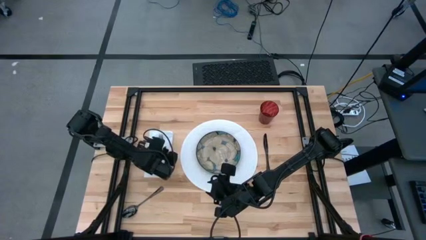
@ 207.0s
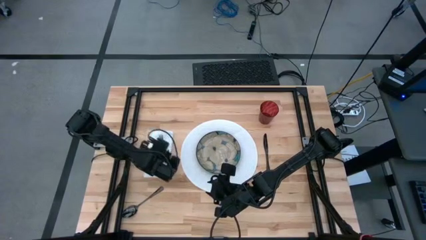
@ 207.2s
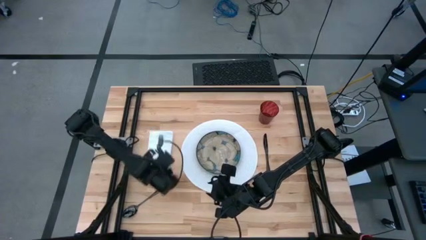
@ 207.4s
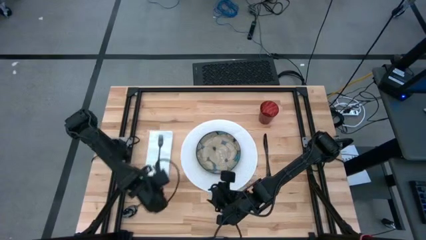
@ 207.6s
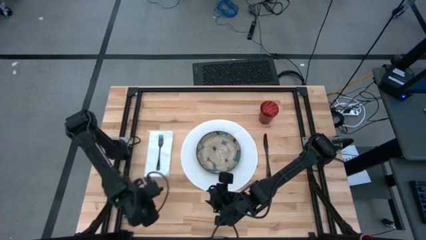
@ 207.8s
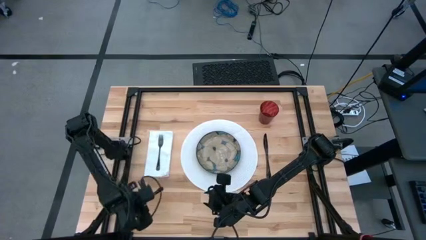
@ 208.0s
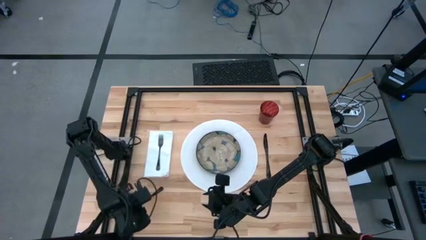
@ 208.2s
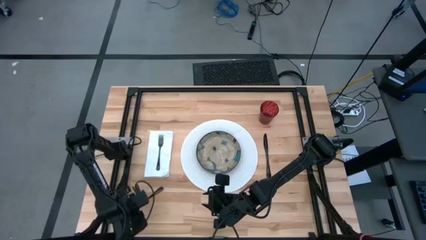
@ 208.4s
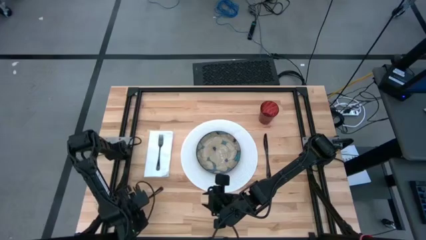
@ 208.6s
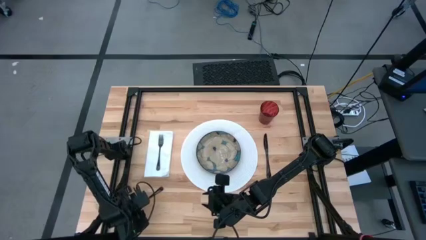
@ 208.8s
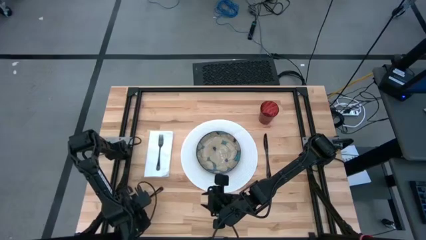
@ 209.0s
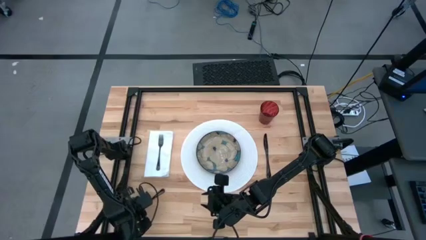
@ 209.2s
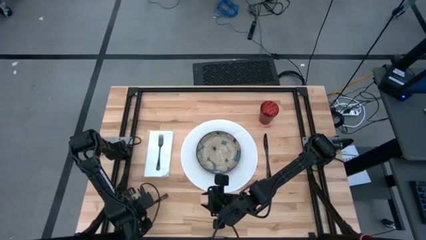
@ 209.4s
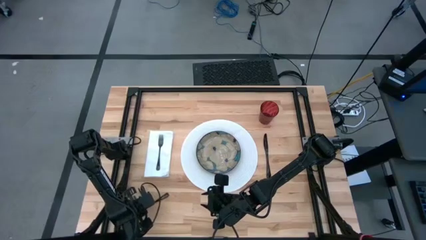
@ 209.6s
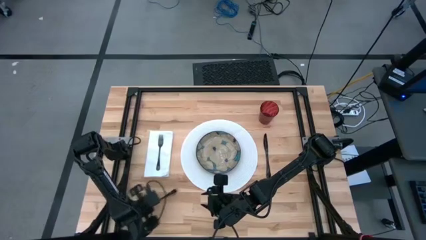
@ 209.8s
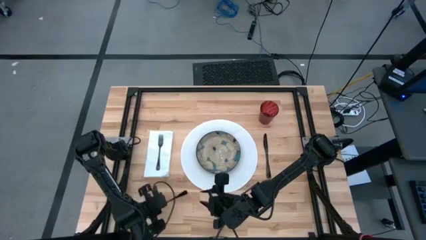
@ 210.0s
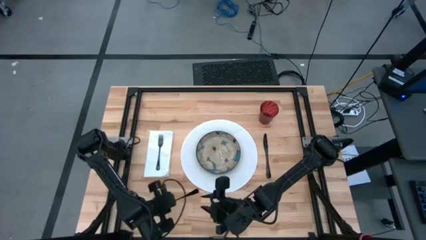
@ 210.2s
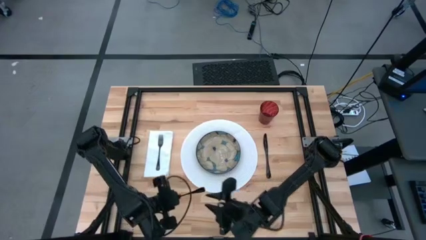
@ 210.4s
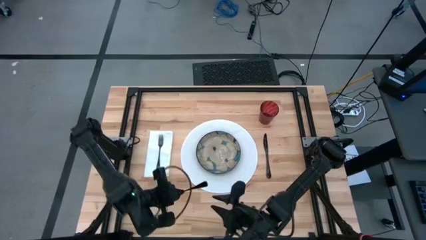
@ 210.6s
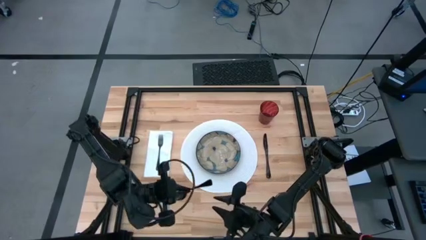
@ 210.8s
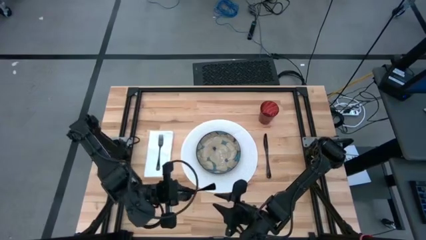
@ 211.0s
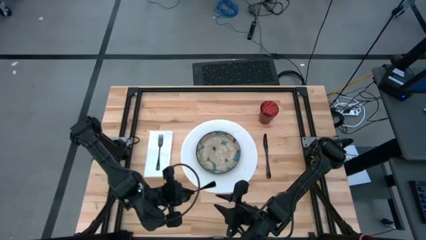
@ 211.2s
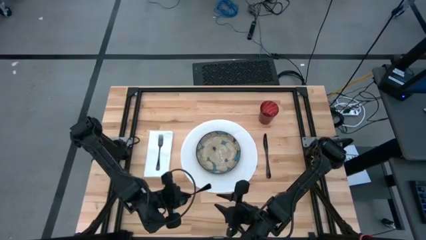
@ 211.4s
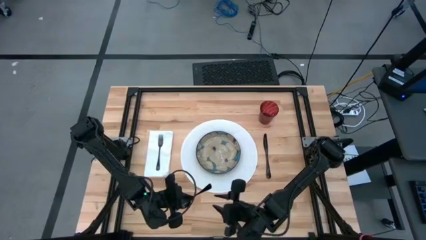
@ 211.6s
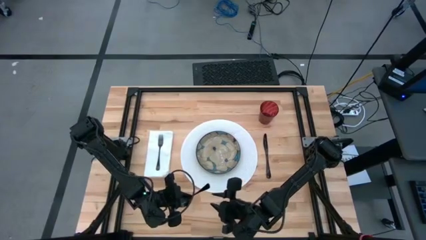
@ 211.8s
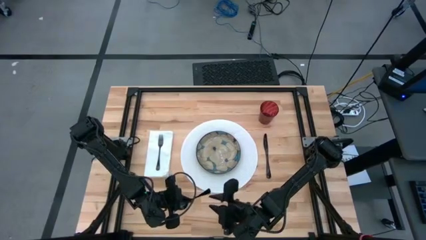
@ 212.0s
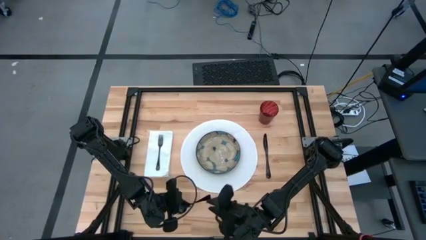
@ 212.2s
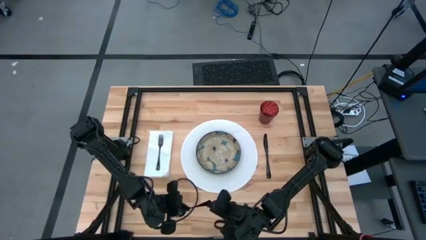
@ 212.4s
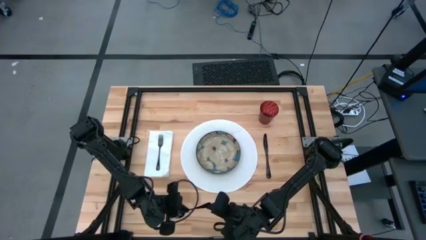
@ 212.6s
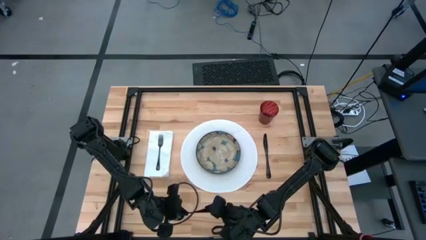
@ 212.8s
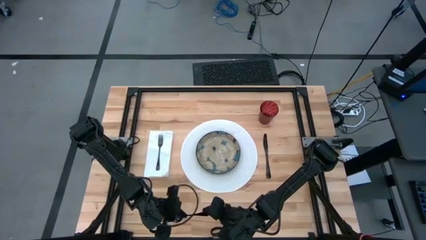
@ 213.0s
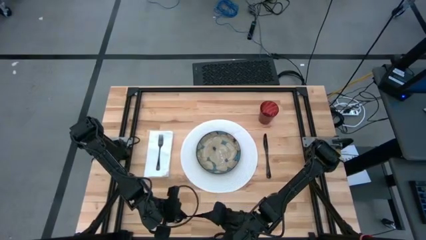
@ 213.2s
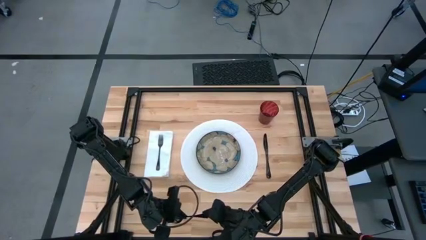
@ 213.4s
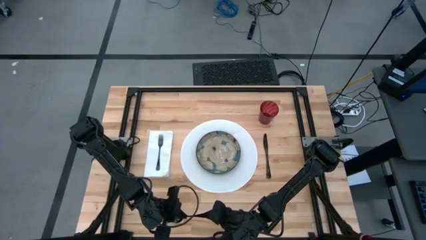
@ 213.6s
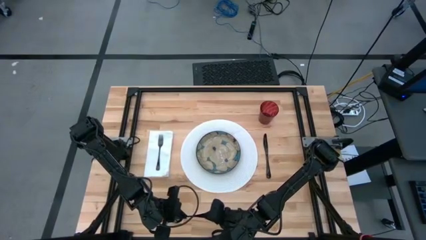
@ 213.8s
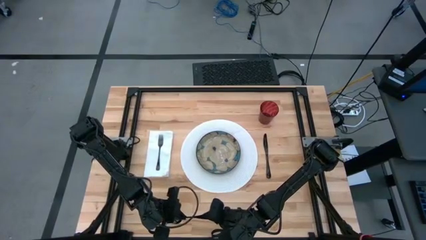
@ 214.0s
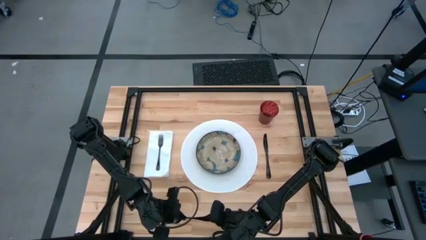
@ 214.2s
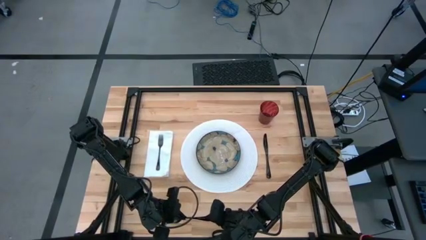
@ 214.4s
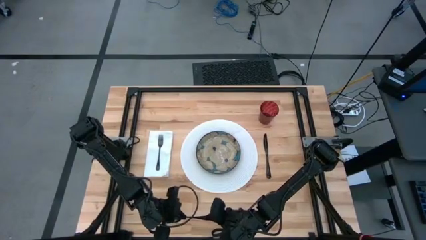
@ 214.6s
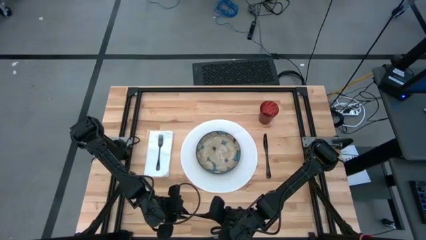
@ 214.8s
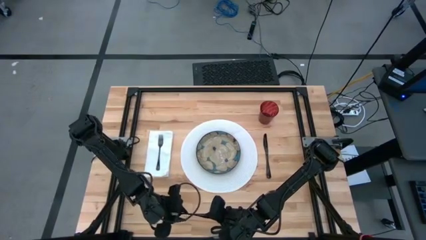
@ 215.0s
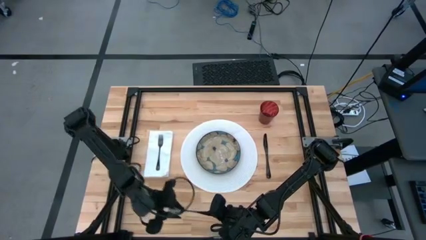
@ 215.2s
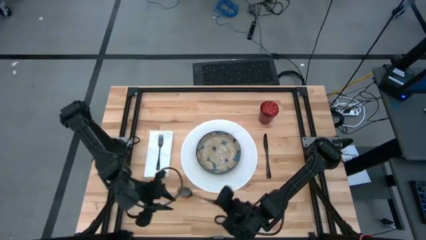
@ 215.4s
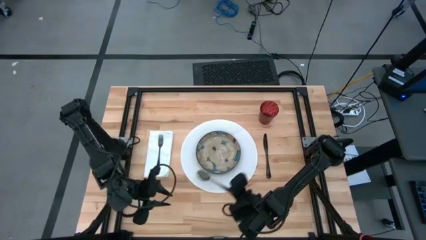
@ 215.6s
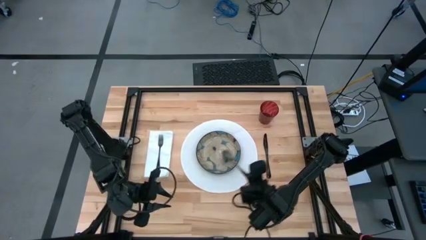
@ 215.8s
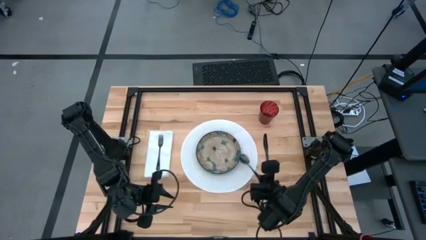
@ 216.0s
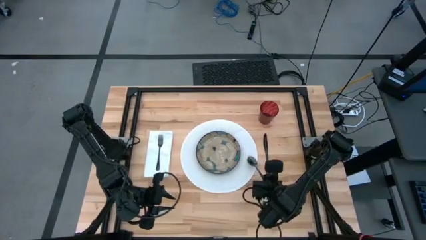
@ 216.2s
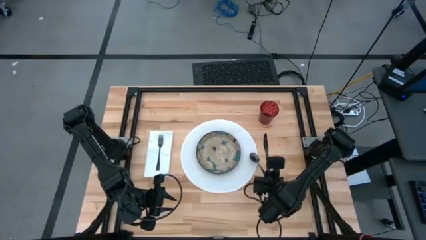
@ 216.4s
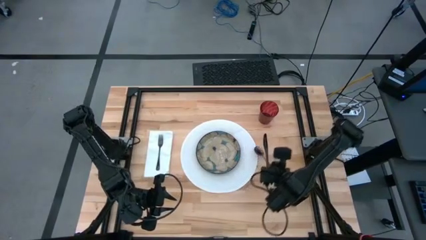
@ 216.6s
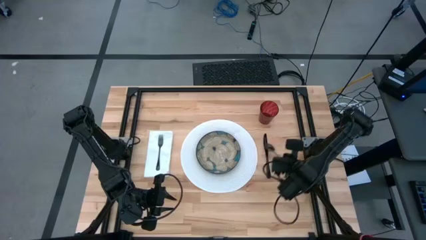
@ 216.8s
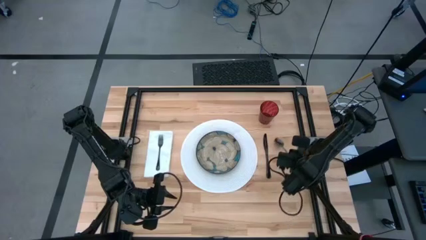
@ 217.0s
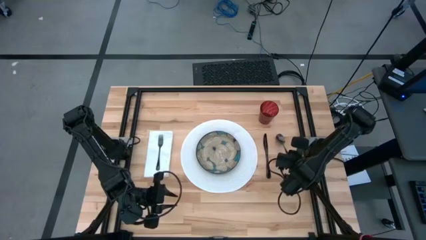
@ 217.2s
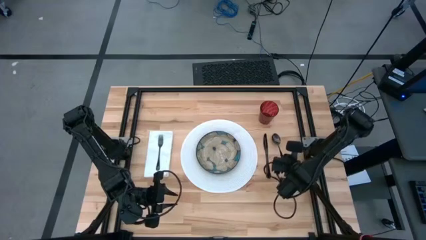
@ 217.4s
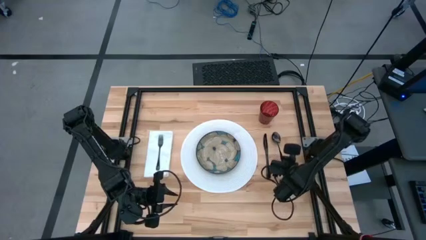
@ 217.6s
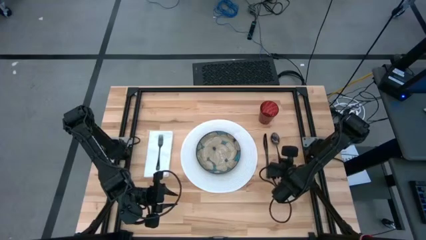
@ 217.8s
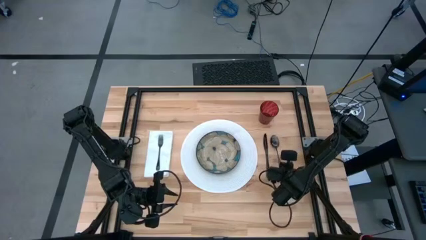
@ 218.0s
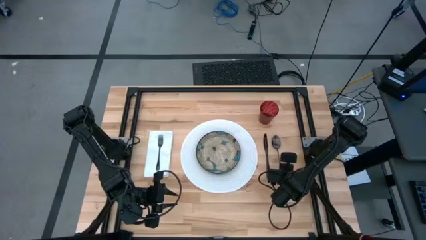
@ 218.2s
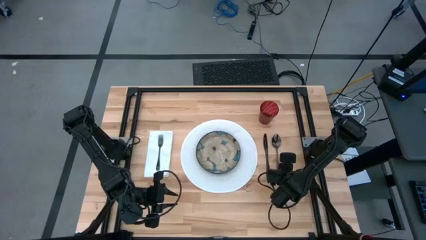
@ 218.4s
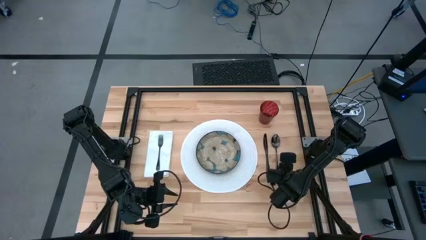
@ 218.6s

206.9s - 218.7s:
Task: Set table place
Put the black spoon to the right of the black knife

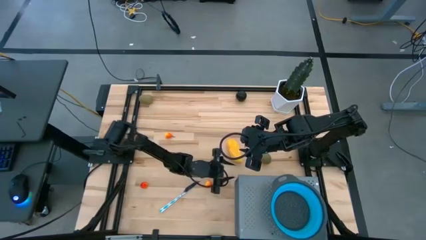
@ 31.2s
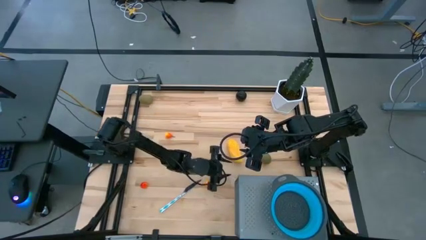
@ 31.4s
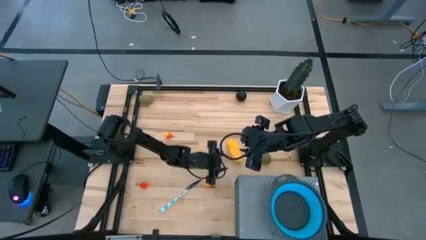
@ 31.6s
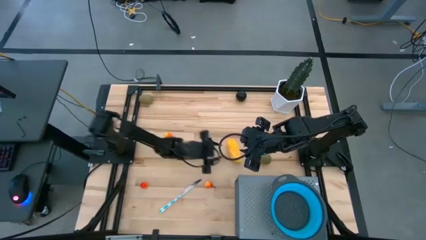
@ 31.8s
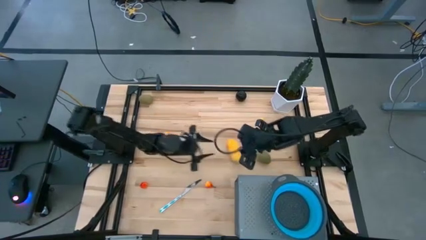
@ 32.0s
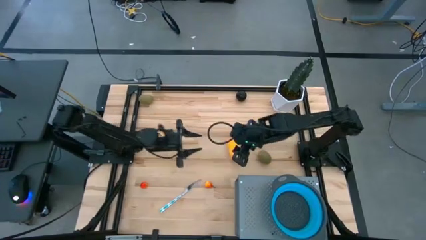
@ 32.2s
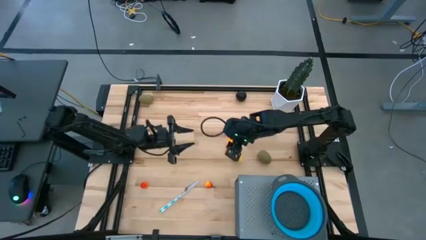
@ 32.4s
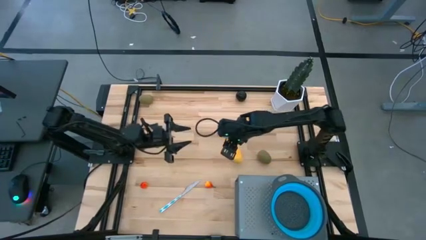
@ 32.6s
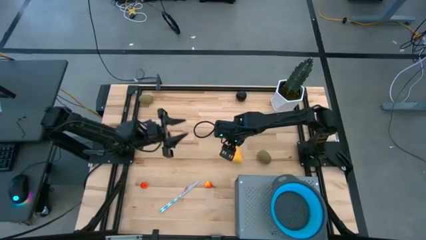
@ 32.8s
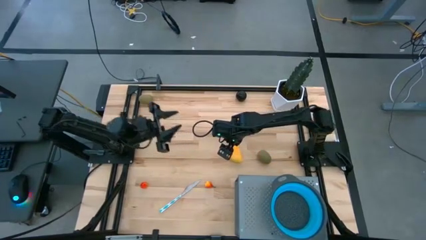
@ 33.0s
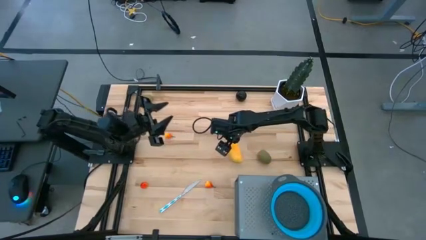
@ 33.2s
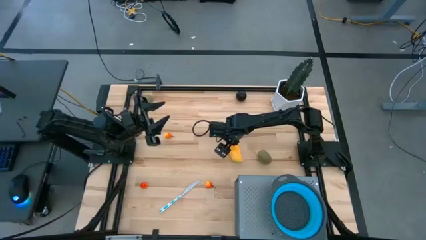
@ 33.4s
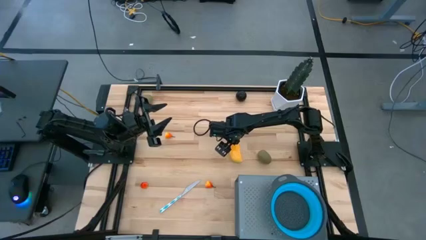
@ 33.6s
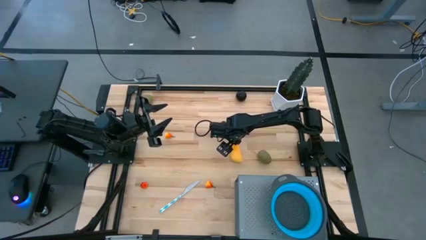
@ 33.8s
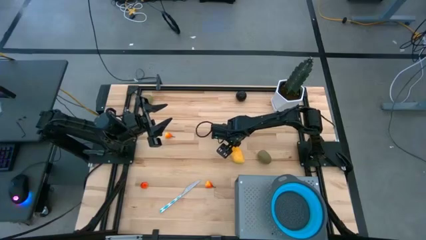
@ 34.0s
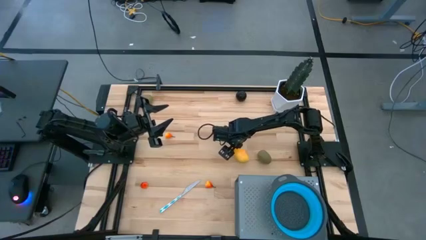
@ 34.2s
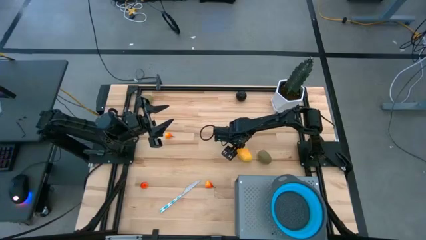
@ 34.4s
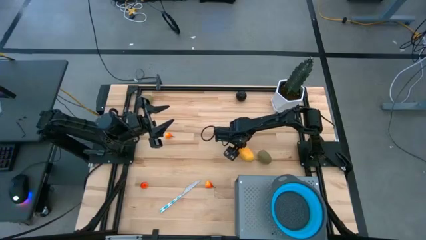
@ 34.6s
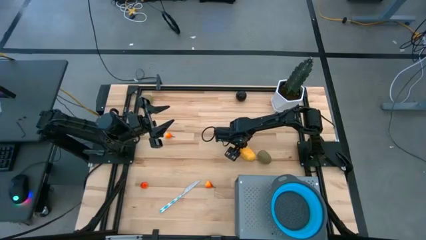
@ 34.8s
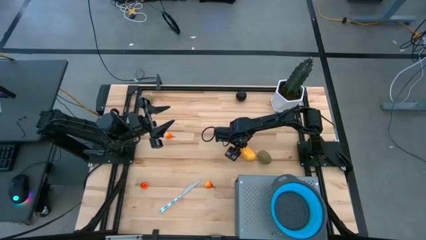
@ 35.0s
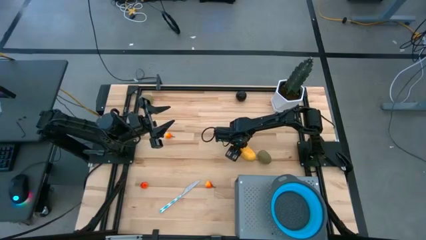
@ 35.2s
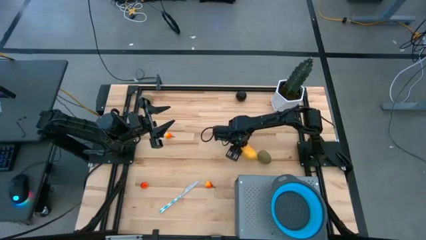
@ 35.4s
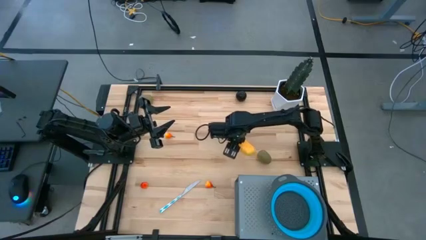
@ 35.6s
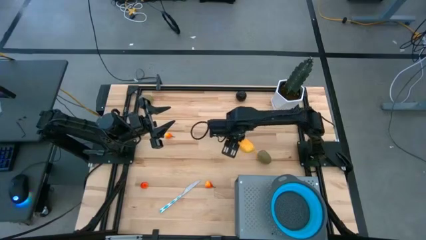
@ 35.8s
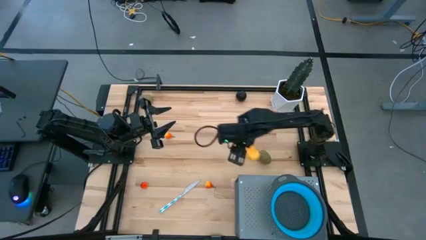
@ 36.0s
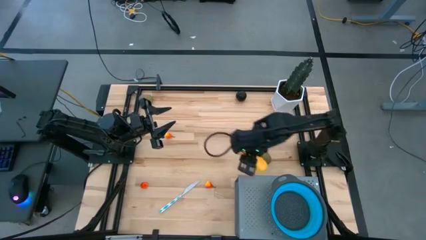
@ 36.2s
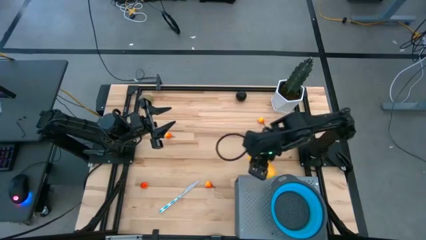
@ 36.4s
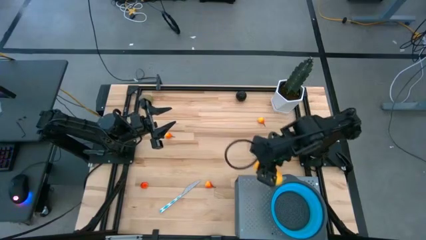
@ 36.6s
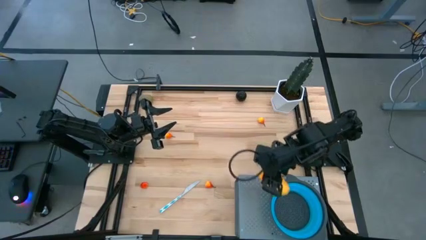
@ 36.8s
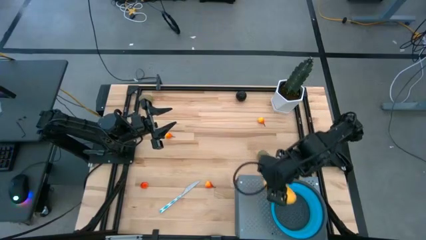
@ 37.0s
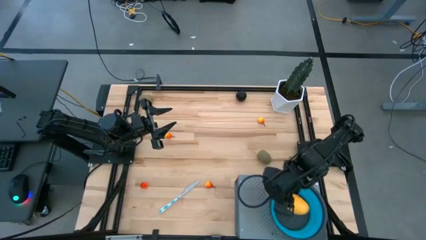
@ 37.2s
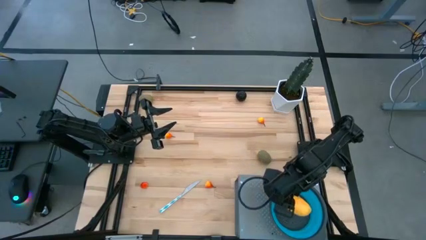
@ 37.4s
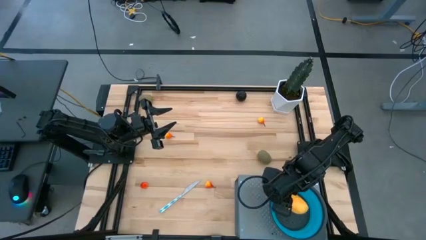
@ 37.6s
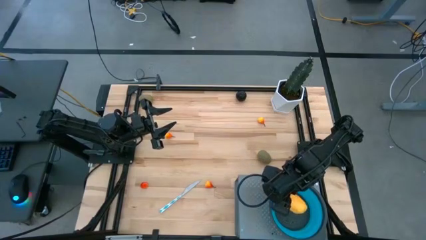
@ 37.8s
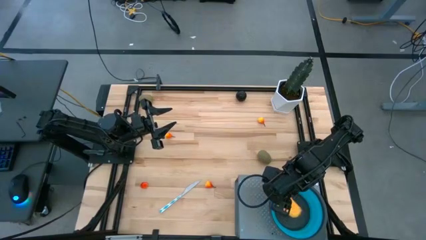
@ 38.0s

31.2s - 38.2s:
Task: Pick & Place Fruit
Put the yellow mango into the blue strainer bowl on the shelf
